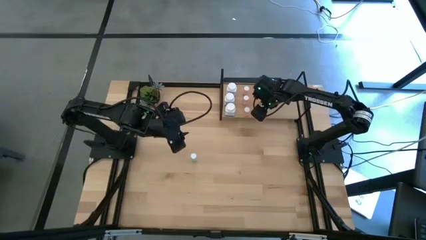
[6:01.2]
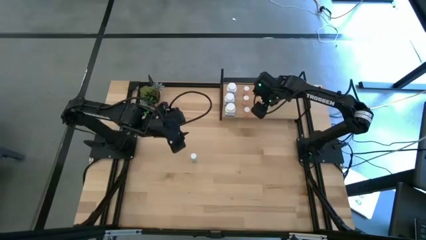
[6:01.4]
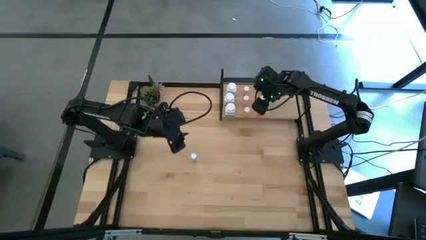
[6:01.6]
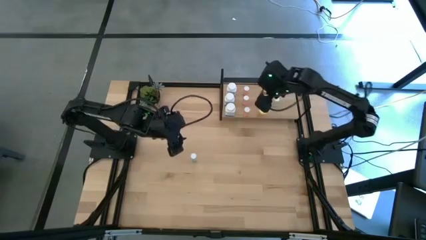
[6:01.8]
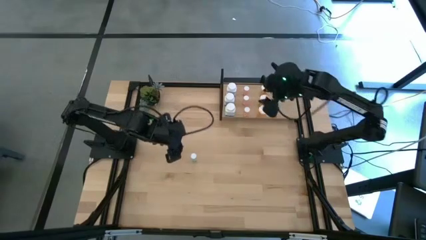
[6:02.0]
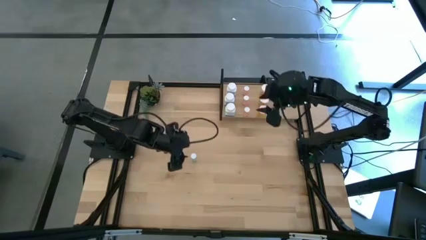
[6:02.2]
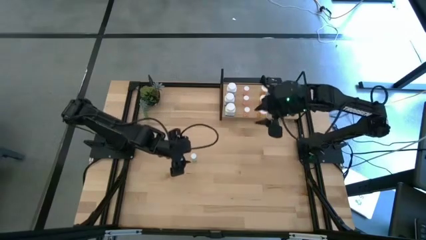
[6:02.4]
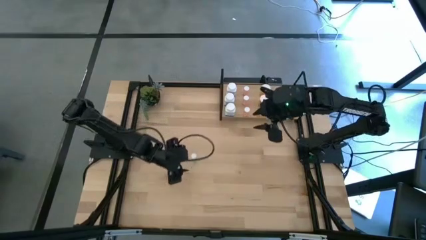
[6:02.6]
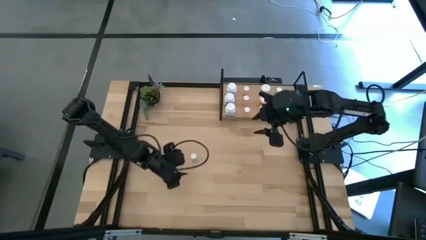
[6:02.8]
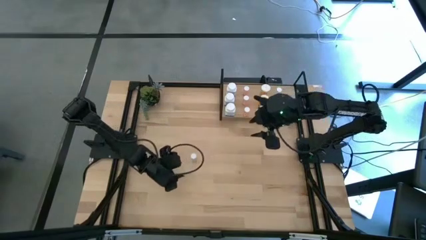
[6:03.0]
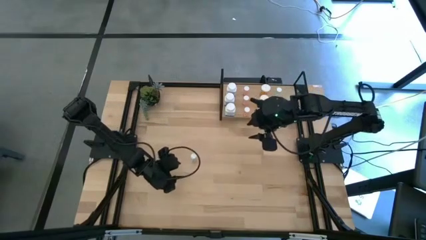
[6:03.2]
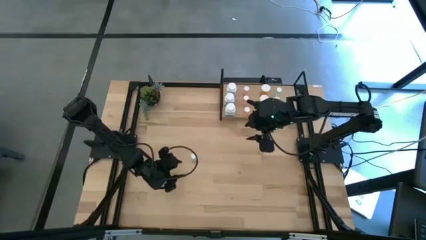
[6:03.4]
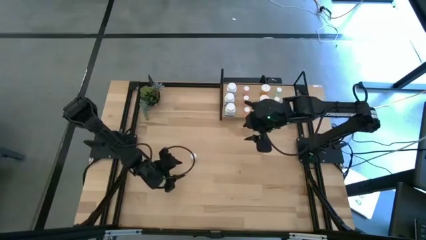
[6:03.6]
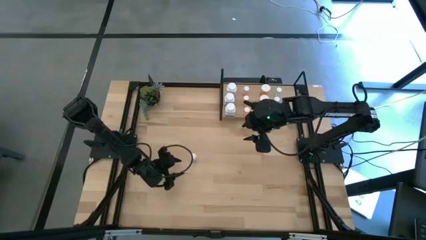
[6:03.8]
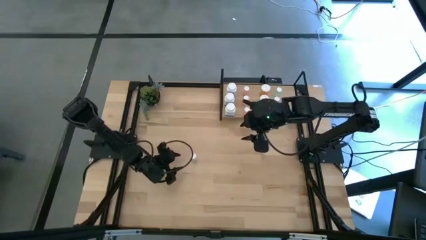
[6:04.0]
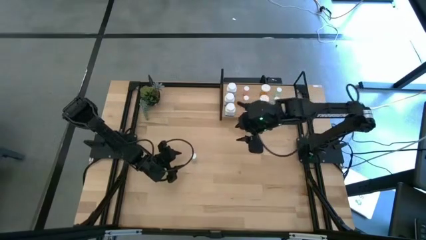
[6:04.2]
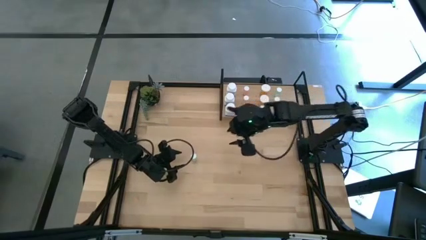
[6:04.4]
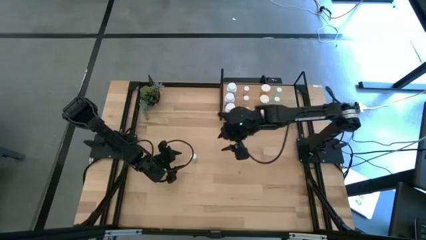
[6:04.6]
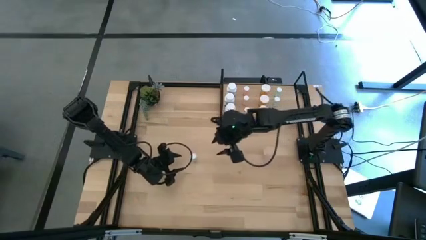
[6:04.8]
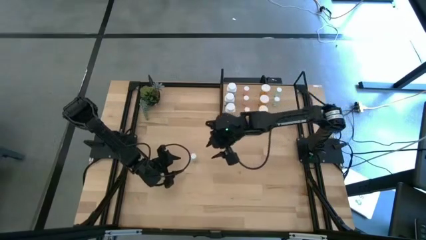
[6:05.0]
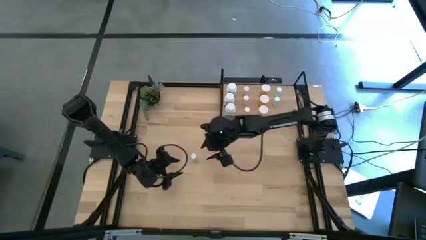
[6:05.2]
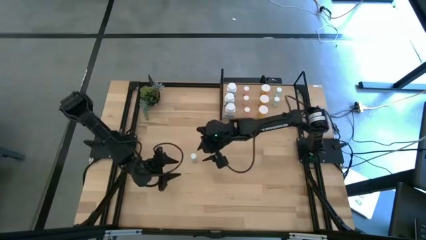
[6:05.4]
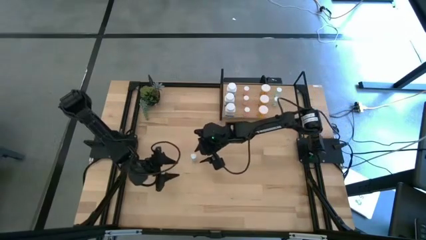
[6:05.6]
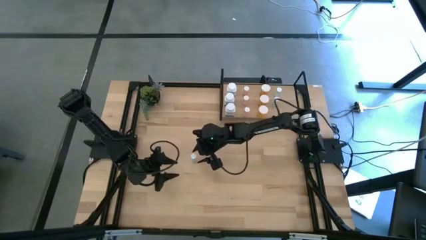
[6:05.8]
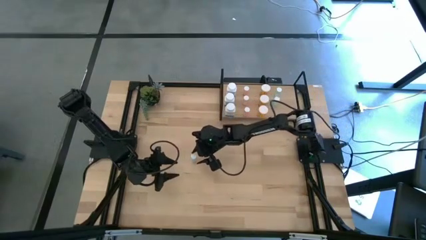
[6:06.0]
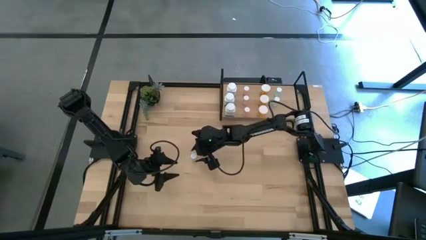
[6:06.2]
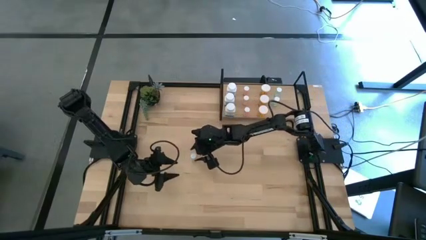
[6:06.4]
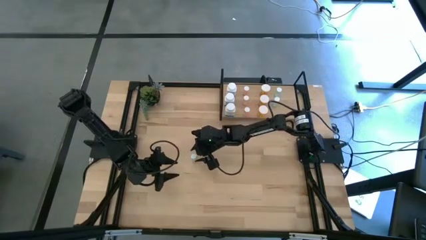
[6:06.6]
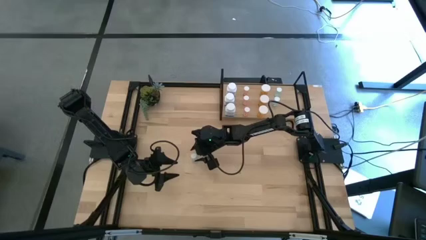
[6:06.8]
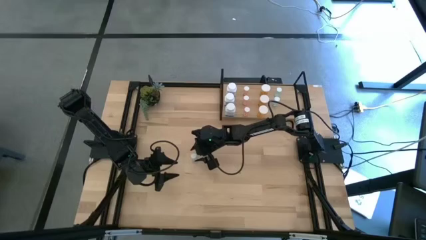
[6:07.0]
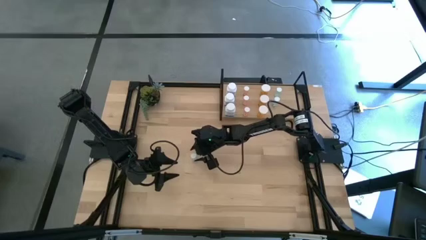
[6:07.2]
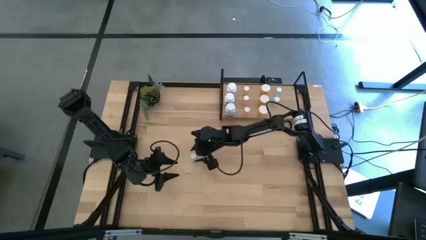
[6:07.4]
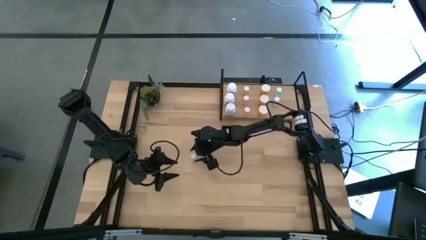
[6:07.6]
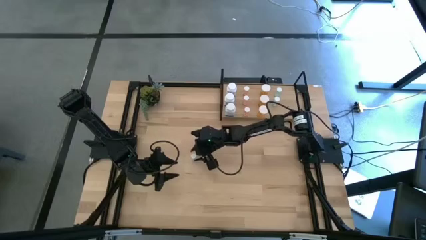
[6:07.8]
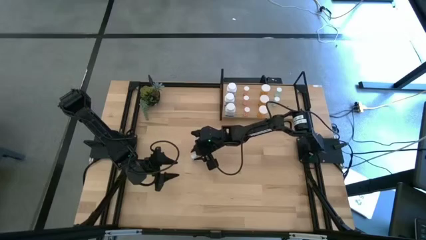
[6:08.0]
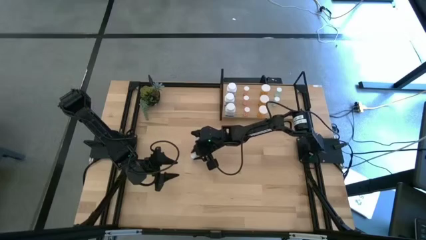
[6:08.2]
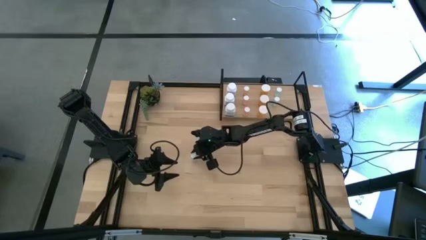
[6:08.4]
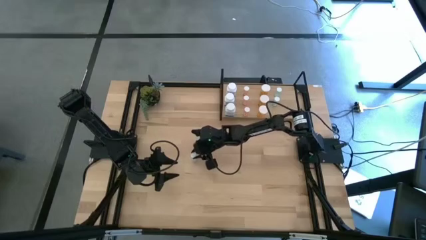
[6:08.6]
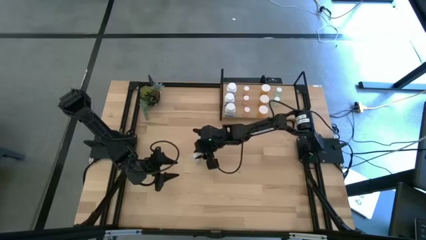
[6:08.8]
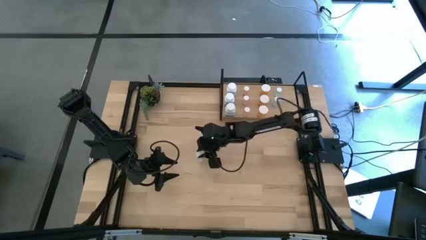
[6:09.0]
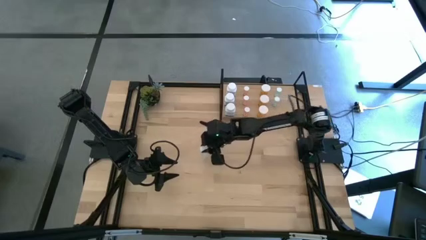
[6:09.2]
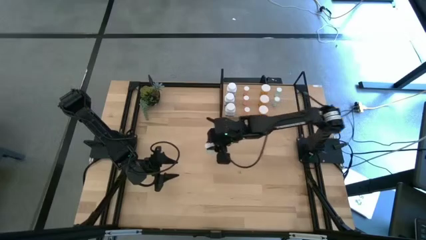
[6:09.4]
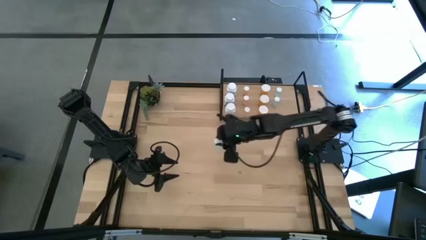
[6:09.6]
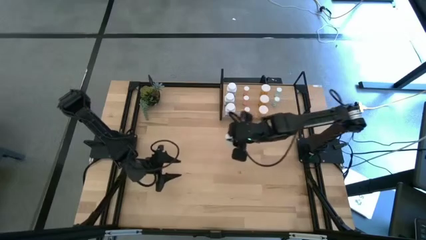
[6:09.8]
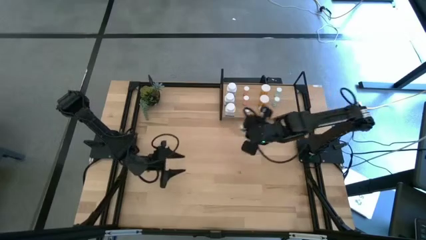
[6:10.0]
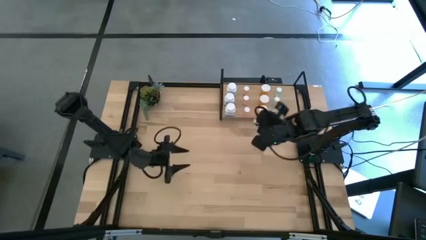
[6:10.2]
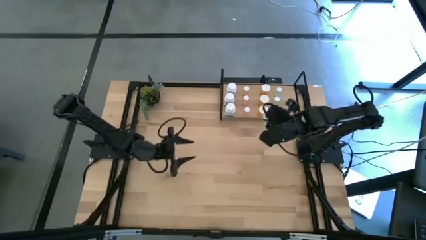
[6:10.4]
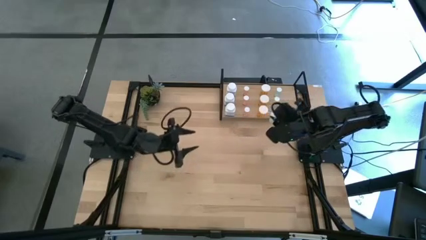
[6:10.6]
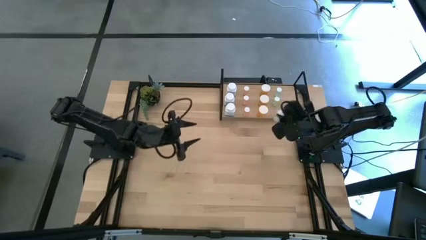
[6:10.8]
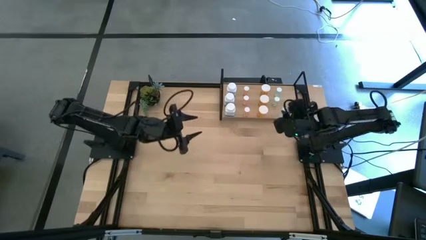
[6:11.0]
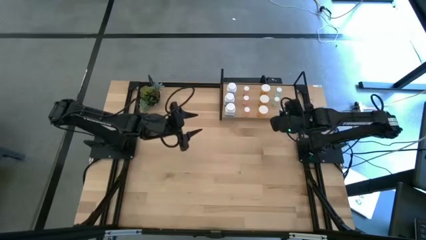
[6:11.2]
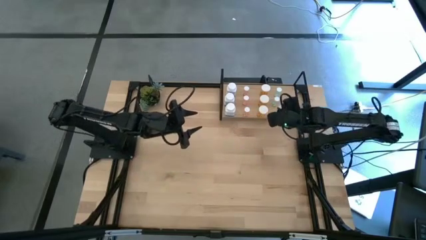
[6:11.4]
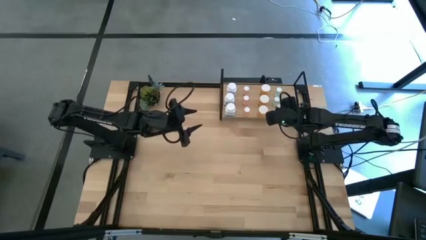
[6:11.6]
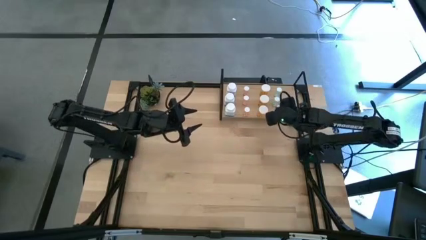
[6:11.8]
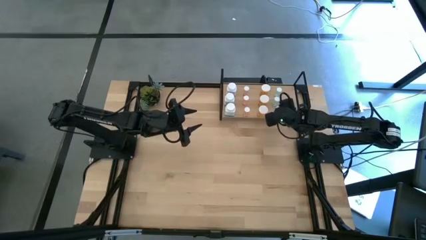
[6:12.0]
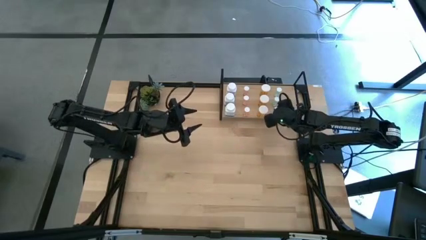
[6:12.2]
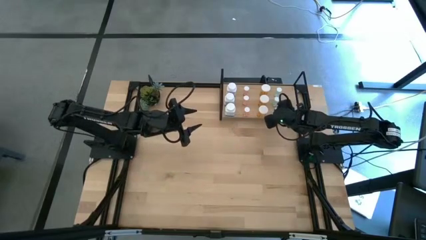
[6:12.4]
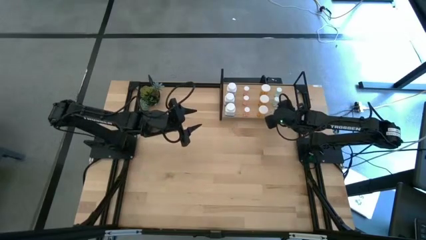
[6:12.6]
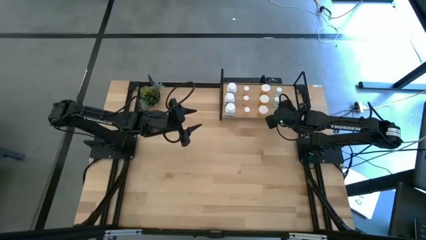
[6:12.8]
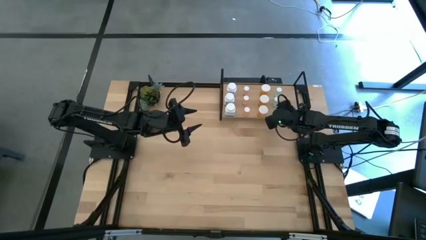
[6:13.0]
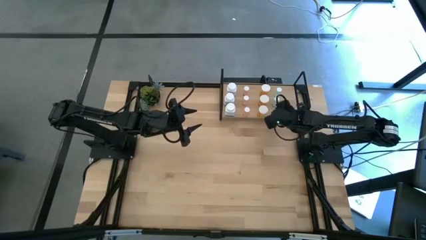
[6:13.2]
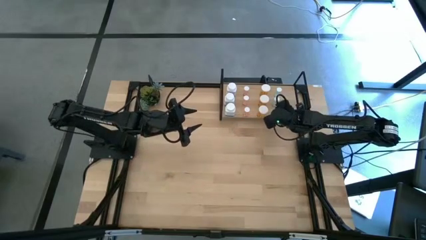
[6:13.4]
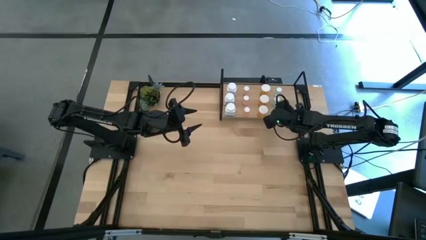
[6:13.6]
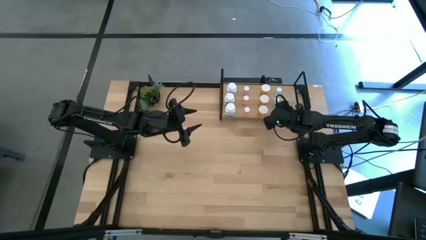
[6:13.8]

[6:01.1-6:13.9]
Task: Pick and place medicine bottles onto shelf by color
Put the blue pill bottle on the shelf aligned with the other blue pill bottles
